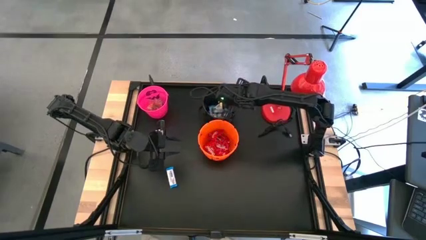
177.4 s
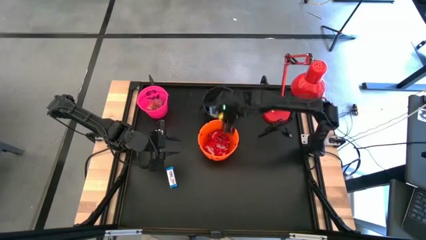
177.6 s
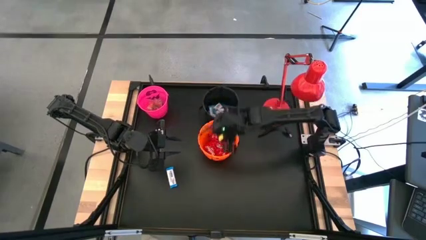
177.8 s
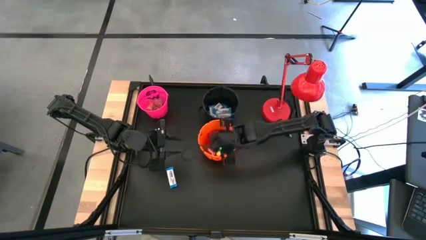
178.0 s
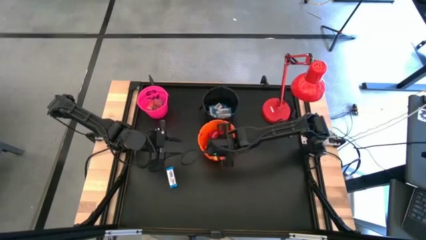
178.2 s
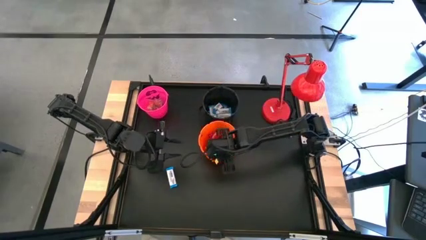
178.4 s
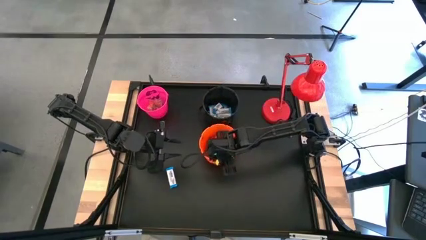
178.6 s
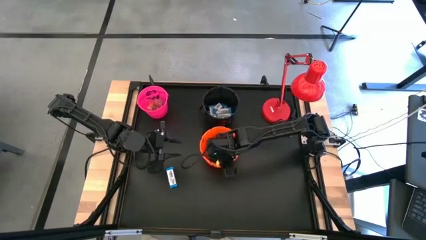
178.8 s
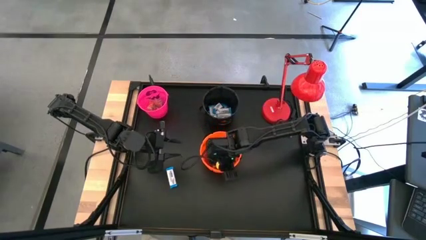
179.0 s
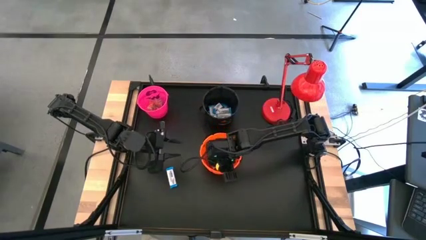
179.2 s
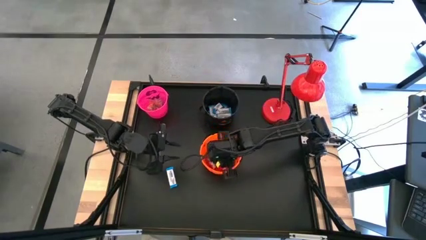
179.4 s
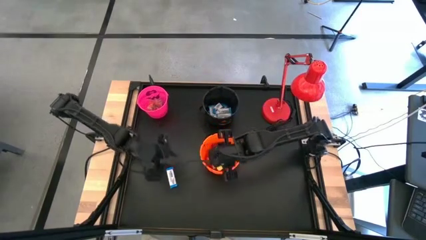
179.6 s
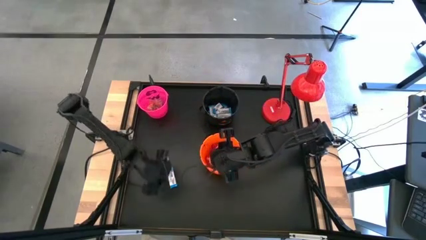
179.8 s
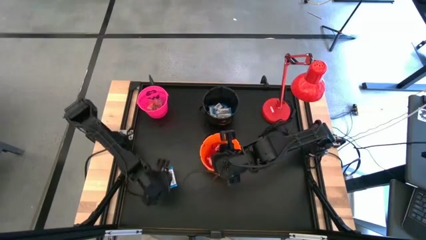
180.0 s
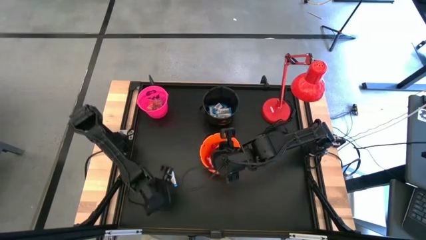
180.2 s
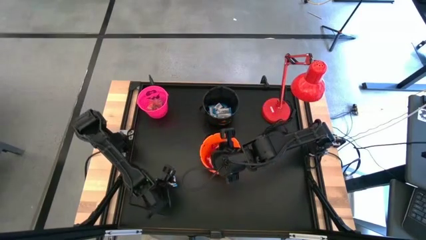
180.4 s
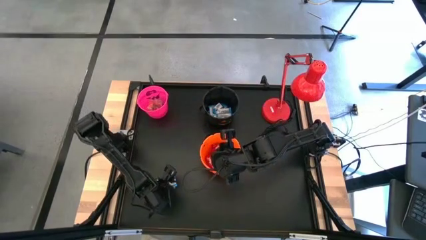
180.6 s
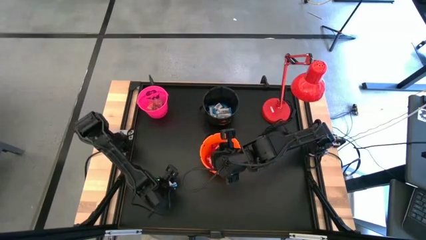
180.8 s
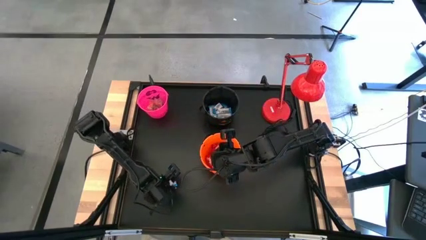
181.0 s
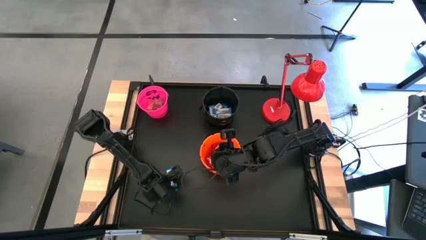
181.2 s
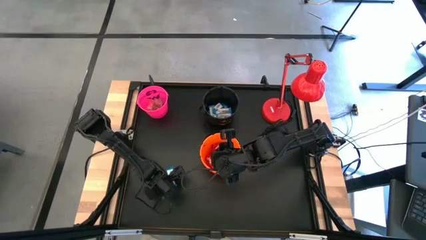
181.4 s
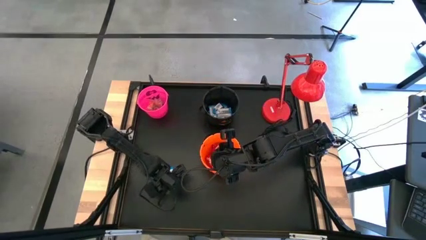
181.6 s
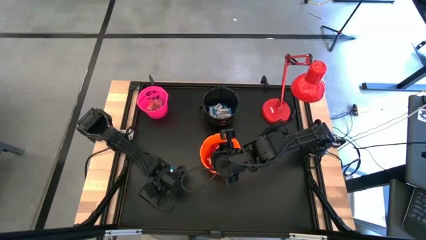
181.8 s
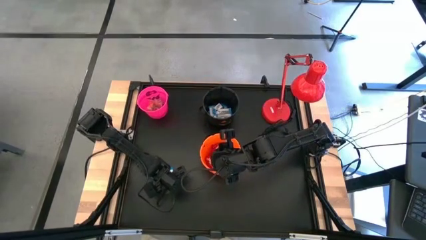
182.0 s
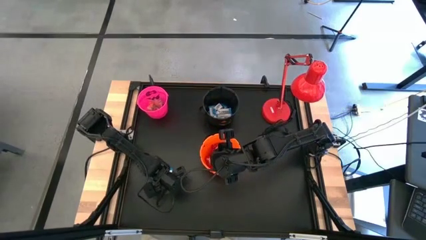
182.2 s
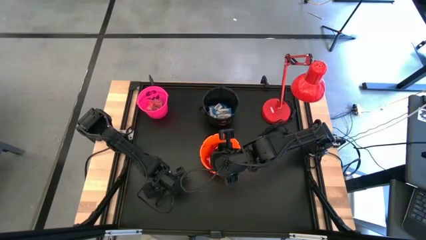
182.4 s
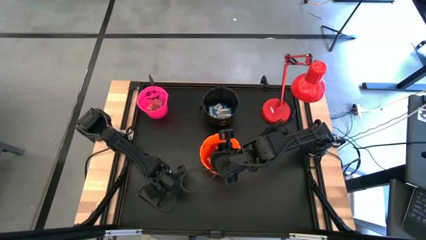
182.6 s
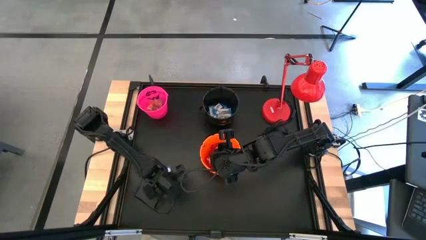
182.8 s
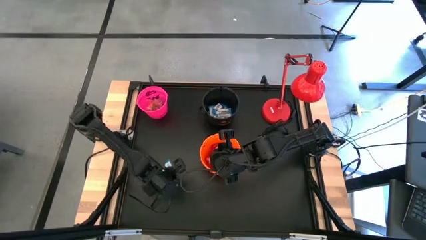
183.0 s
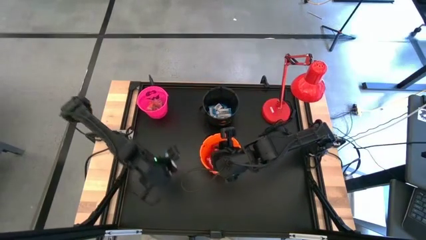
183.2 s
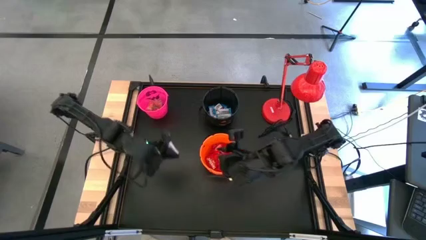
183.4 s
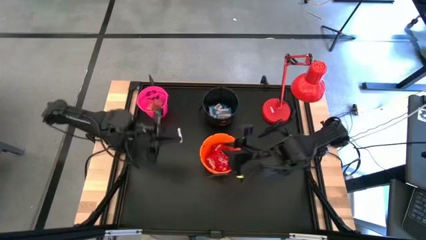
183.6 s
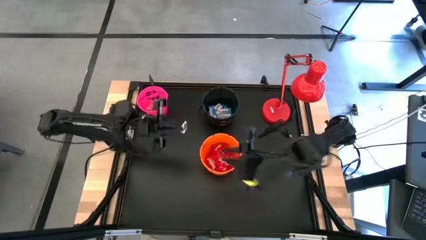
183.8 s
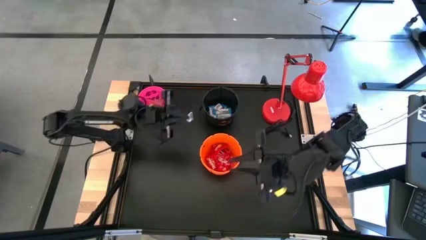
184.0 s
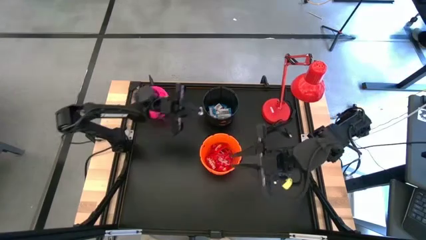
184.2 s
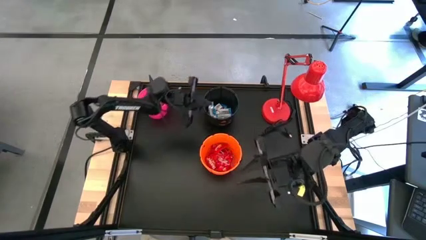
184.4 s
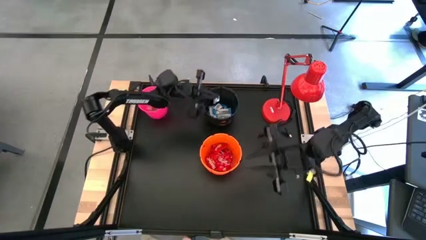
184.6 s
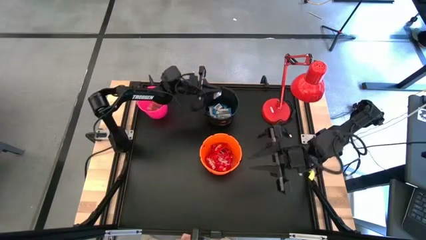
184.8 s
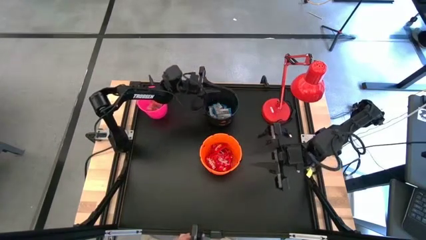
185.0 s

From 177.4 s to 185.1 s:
Task: Sort candy
Put the white chocolate into the black bucket

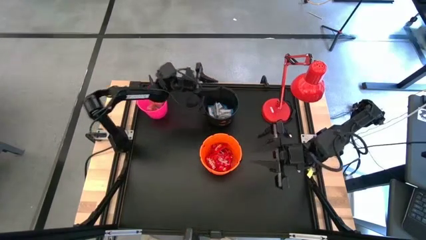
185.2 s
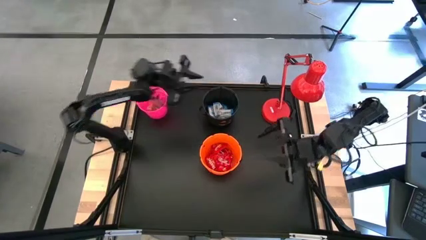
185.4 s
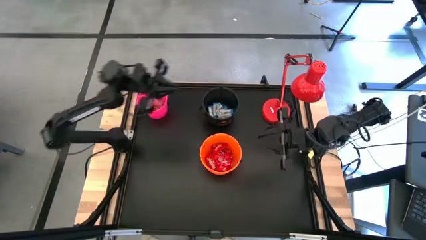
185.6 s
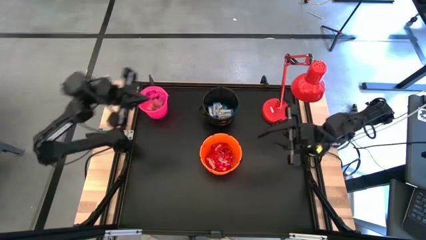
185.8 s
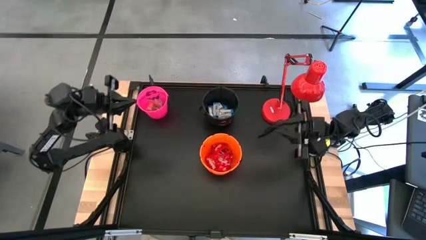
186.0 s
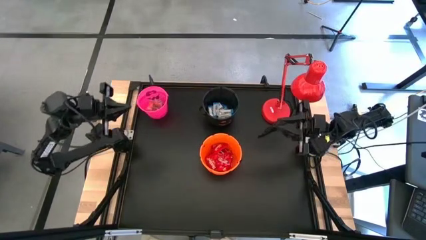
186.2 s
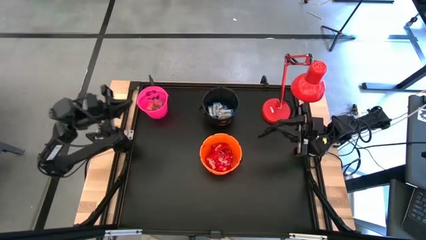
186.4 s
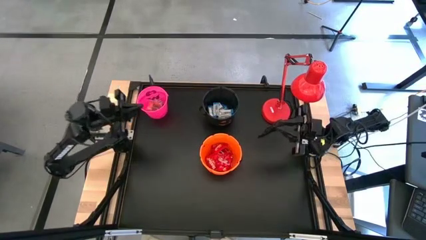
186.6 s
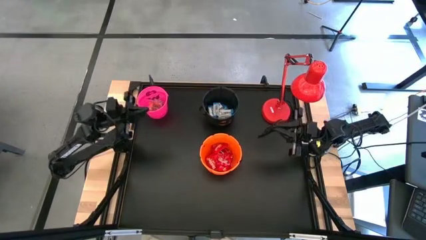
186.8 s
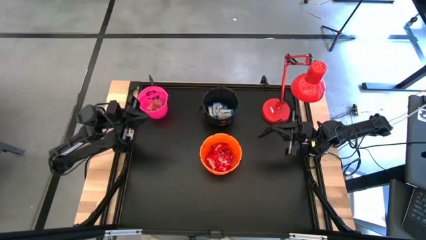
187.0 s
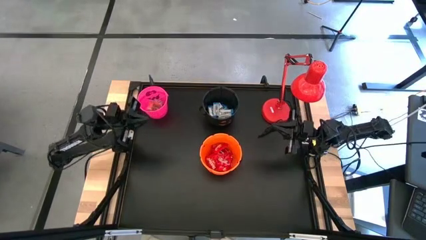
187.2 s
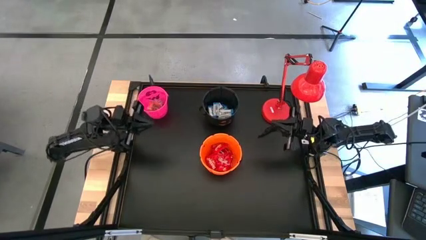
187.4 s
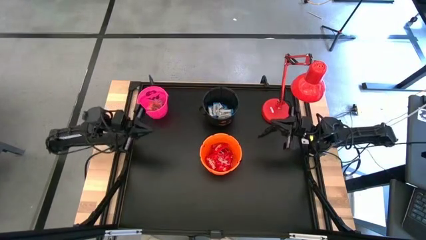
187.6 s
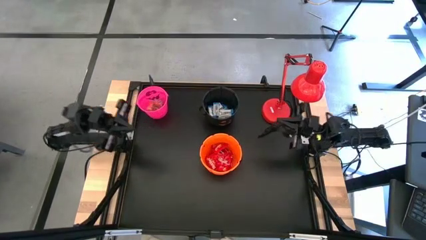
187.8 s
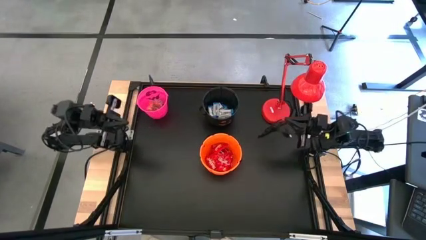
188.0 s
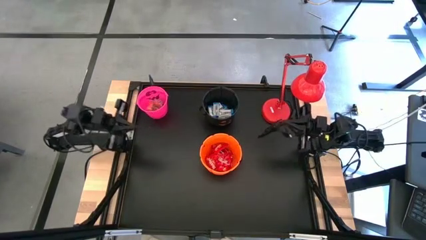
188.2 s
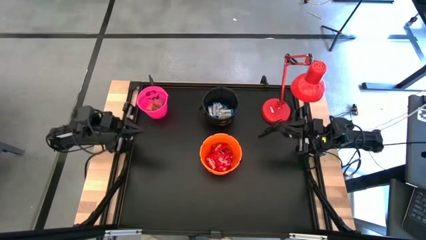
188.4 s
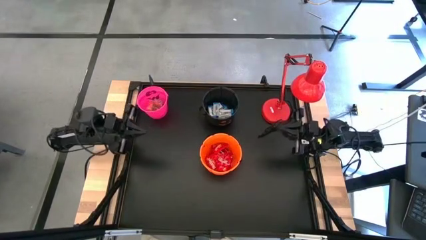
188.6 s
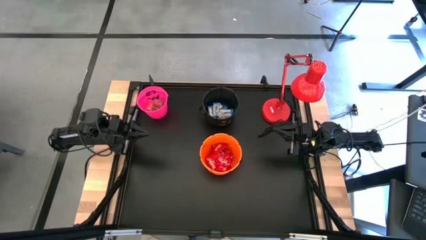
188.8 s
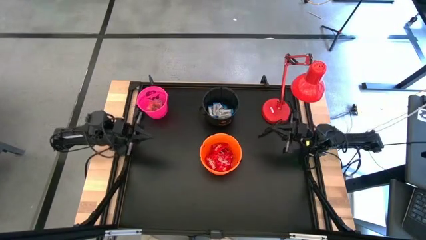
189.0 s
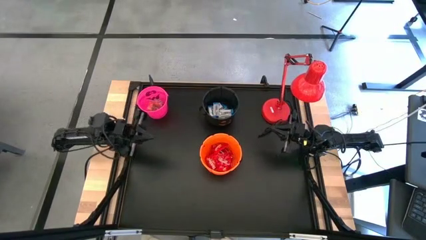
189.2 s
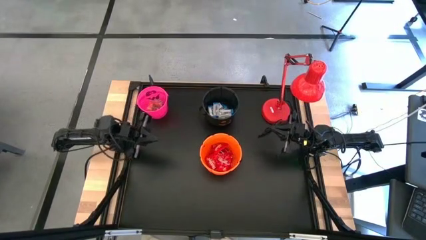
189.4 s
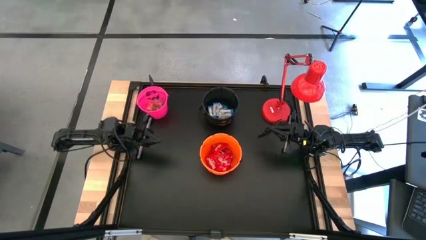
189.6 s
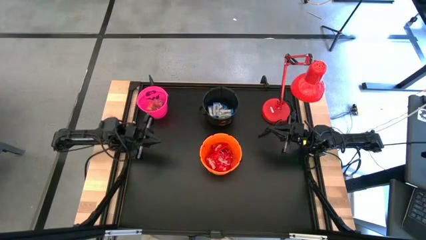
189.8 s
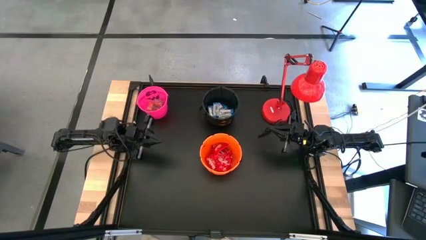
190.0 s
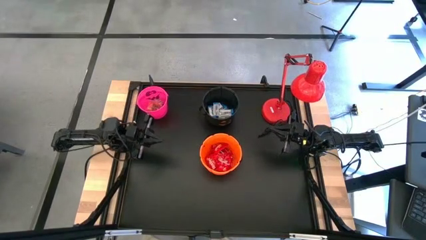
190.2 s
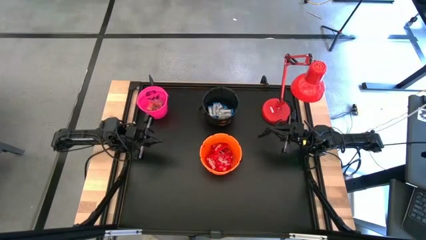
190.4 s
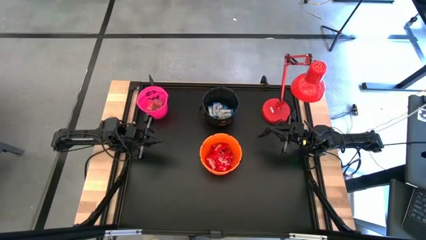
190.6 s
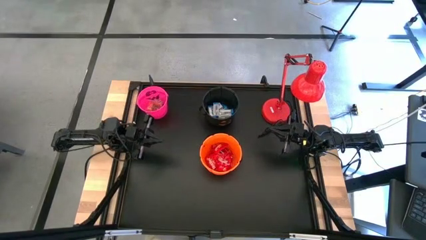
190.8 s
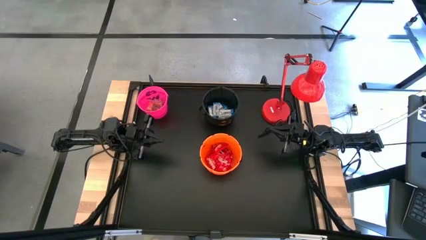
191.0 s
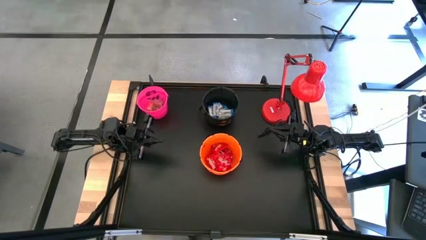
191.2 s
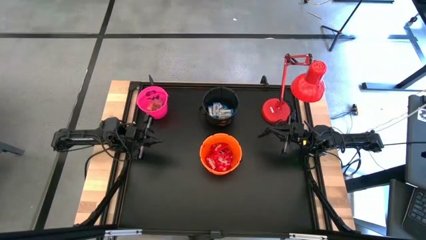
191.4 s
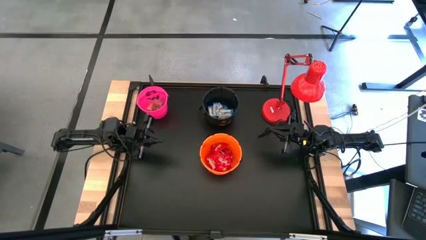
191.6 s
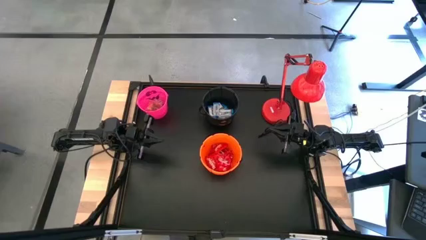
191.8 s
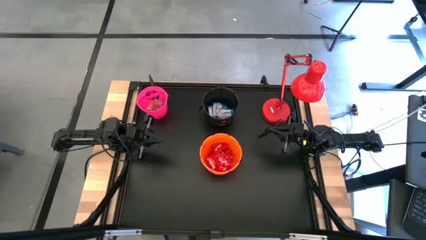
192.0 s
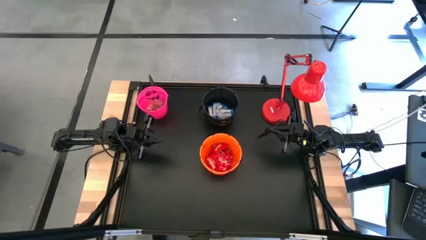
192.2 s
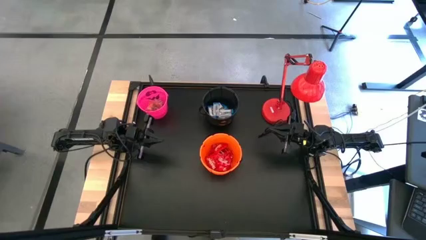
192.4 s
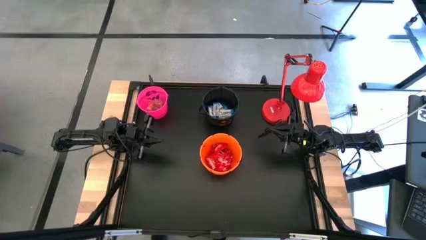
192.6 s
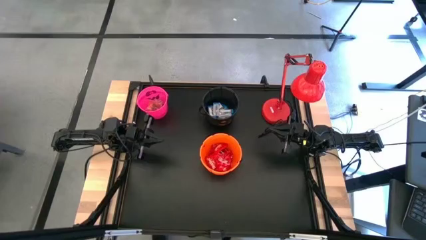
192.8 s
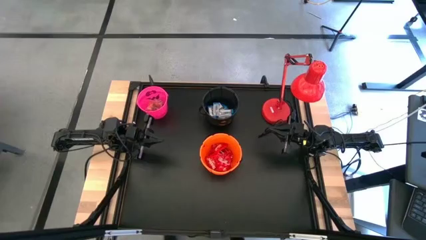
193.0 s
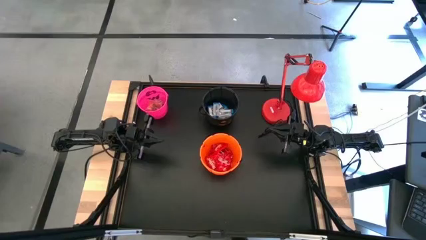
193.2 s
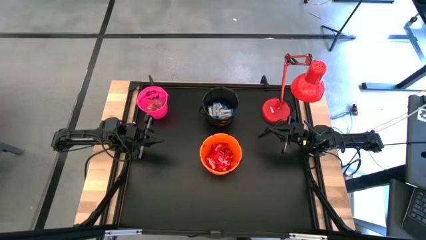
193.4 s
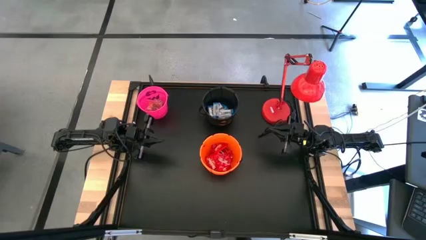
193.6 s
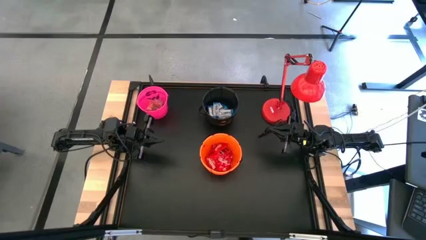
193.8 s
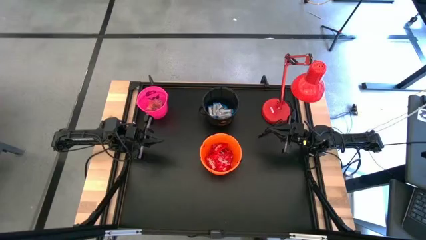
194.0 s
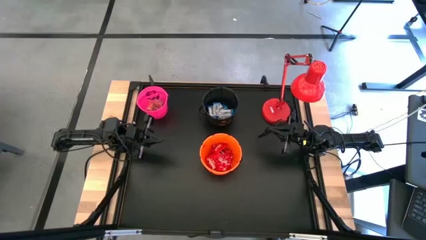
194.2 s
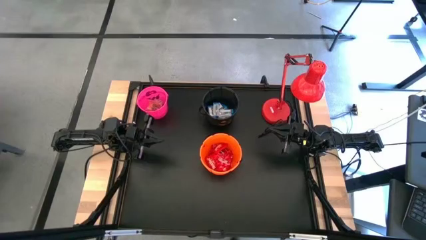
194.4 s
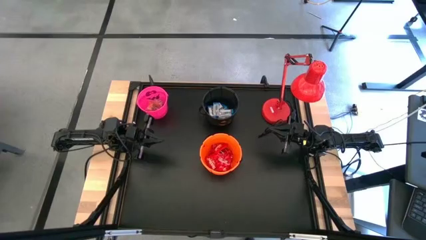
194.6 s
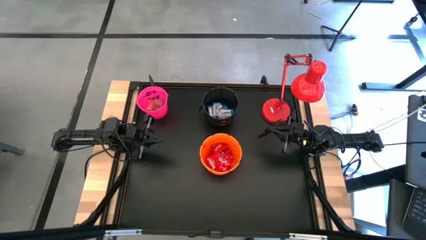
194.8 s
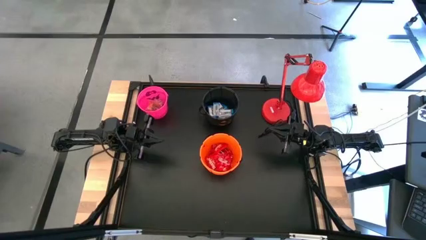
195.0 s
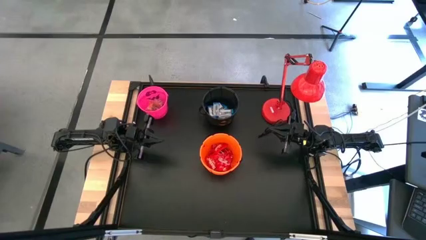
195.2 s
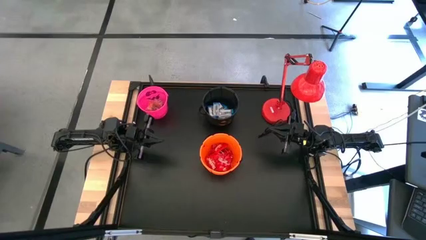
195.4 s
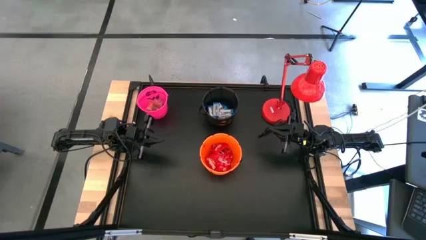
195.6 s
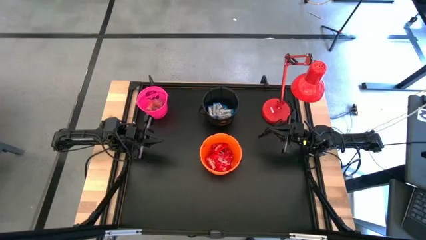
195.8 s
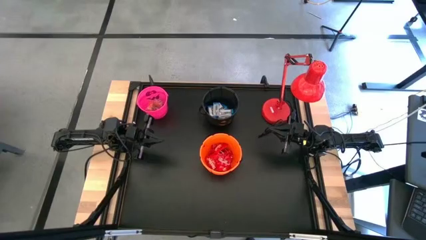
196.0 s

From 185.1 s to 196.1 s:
Return to Home Position
